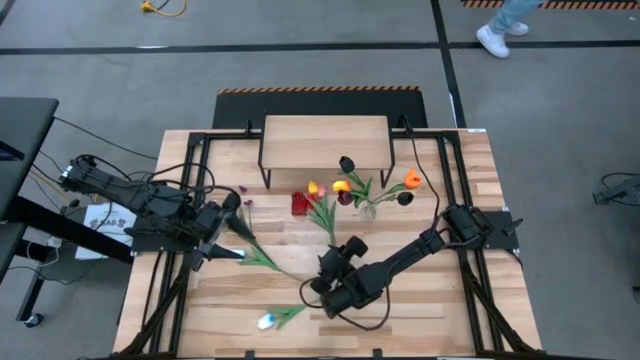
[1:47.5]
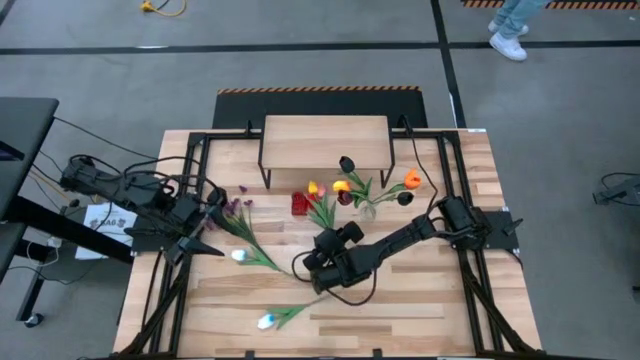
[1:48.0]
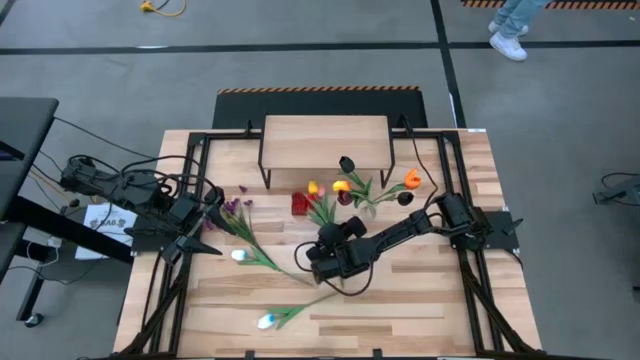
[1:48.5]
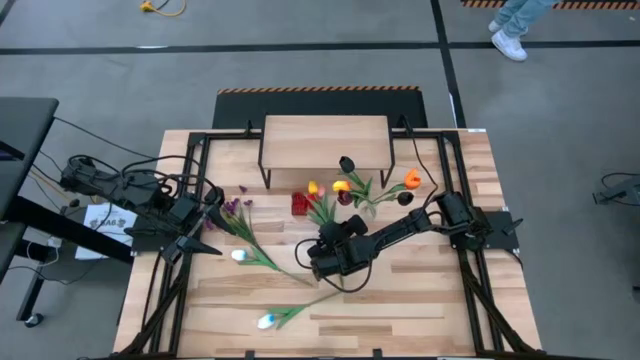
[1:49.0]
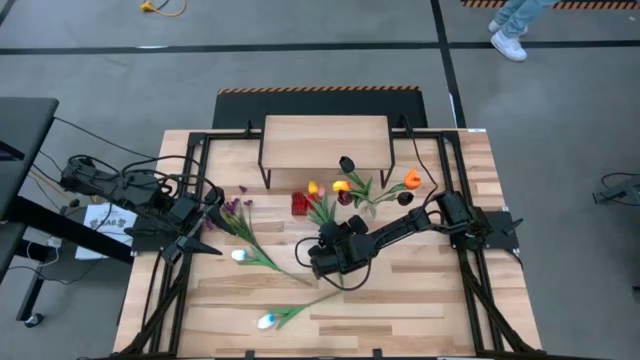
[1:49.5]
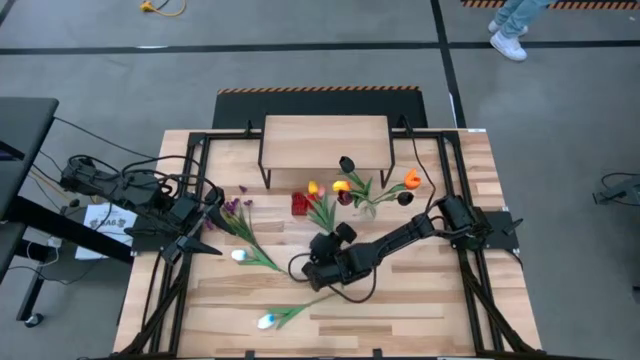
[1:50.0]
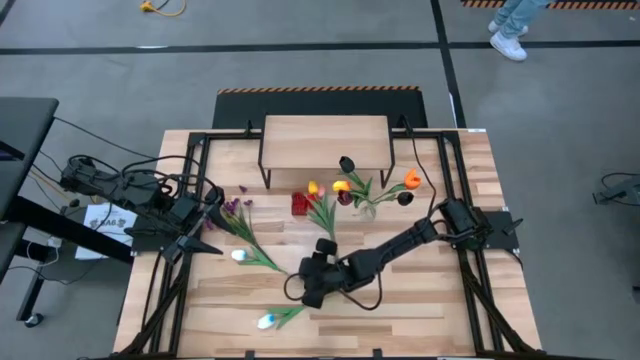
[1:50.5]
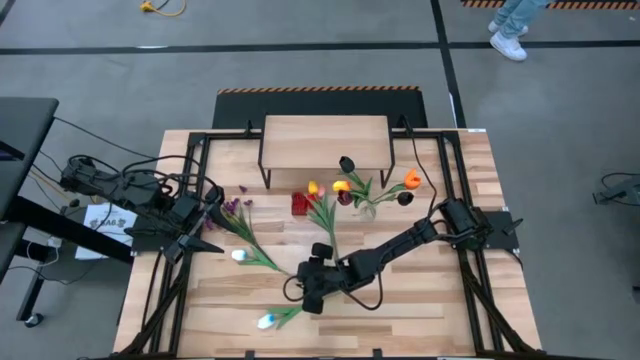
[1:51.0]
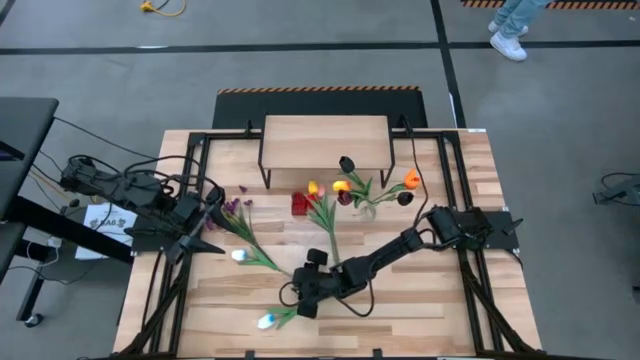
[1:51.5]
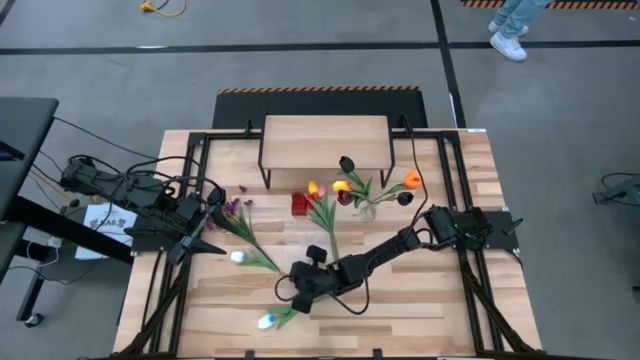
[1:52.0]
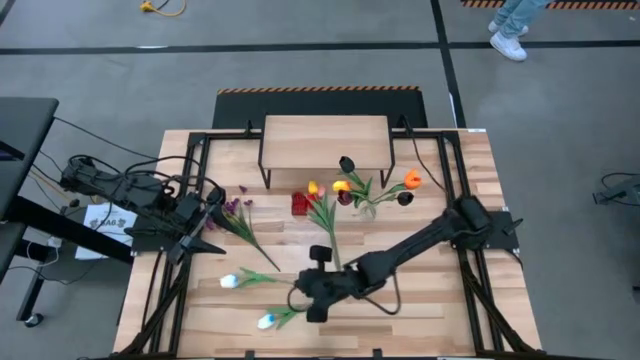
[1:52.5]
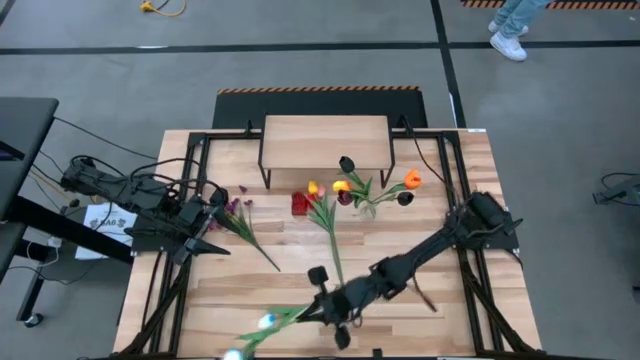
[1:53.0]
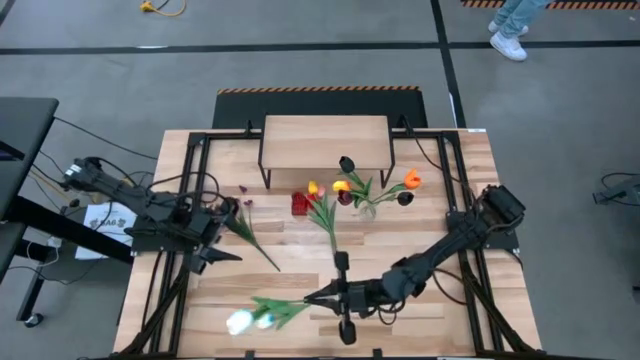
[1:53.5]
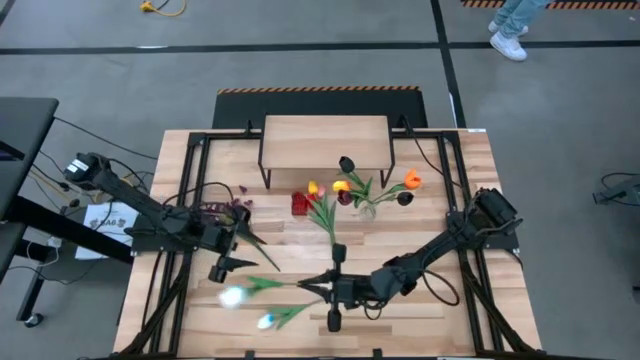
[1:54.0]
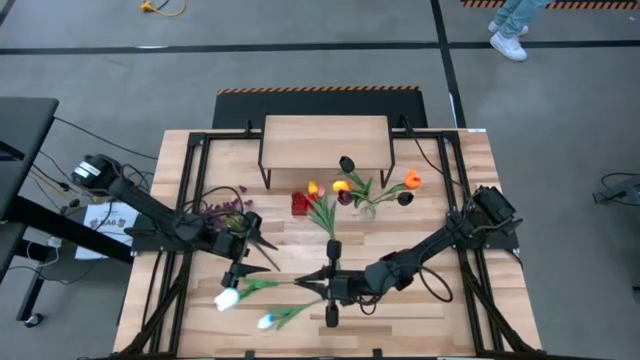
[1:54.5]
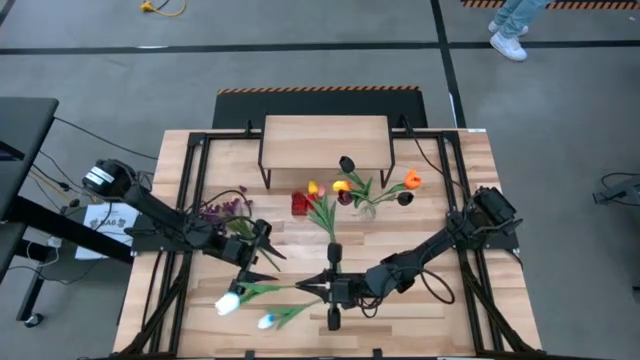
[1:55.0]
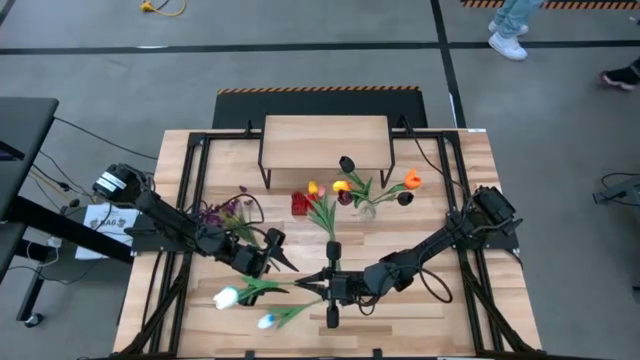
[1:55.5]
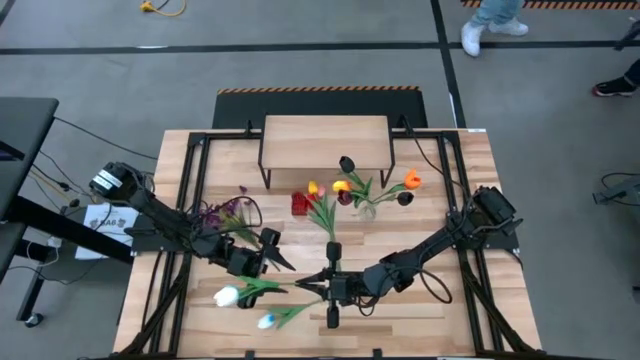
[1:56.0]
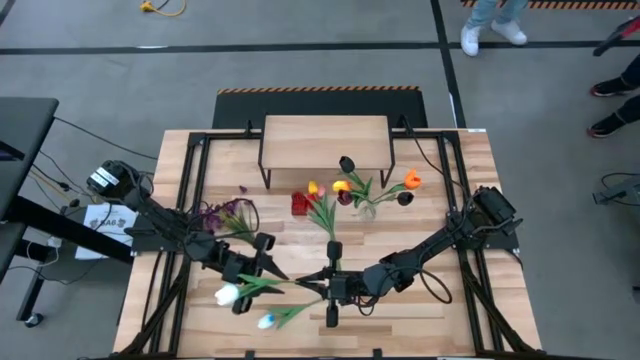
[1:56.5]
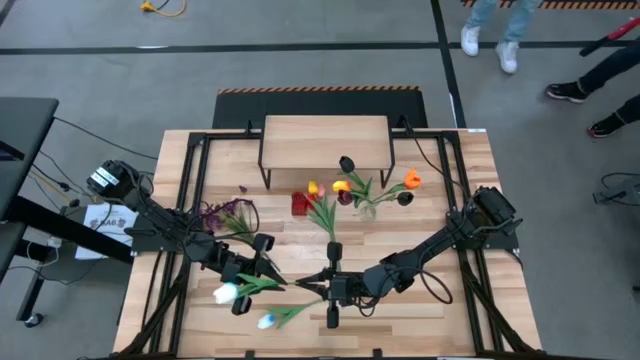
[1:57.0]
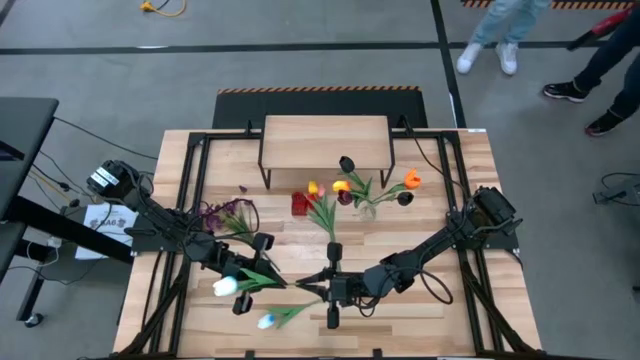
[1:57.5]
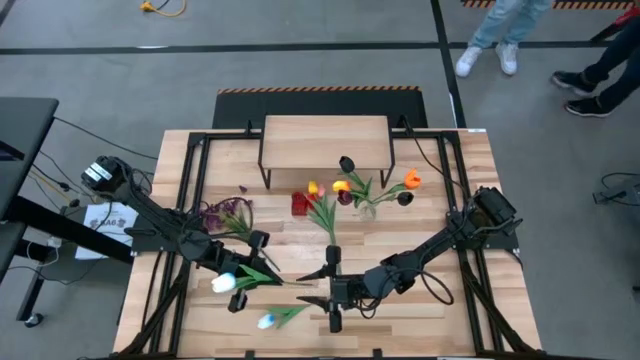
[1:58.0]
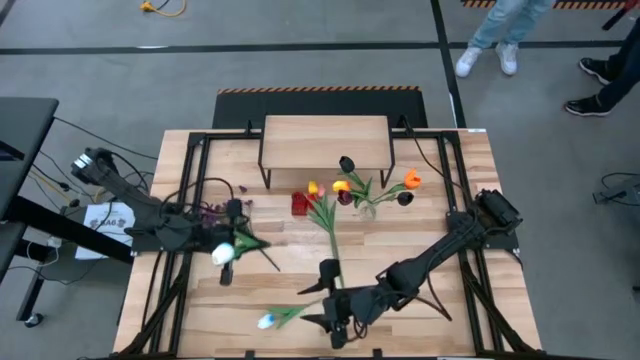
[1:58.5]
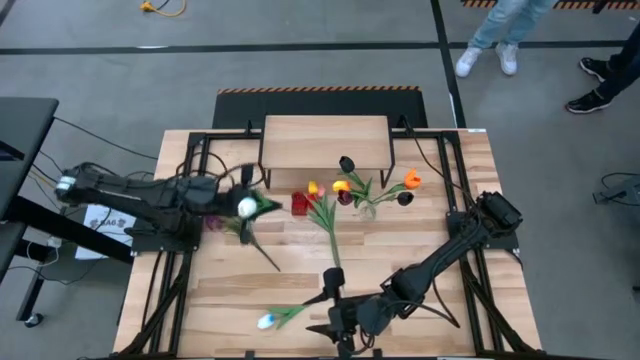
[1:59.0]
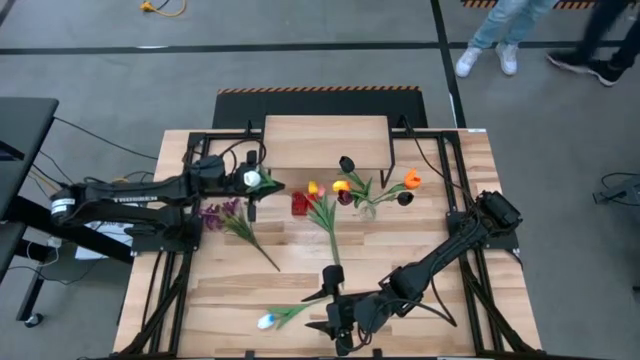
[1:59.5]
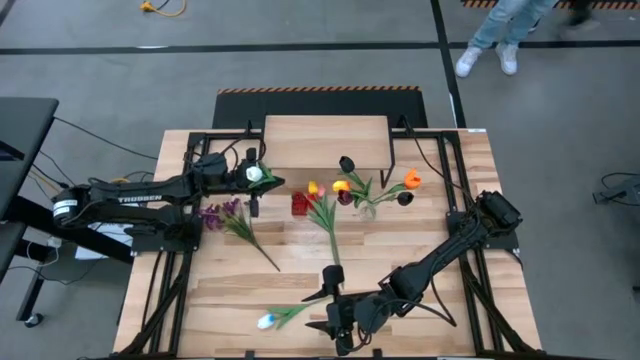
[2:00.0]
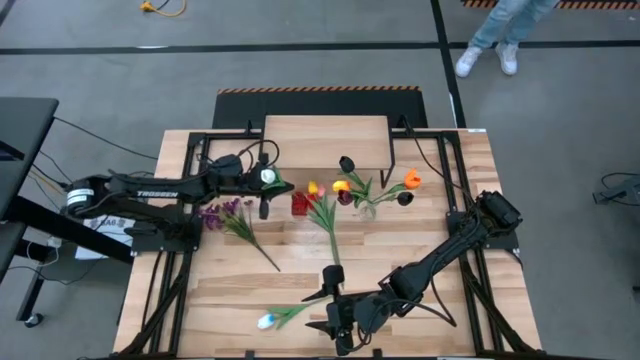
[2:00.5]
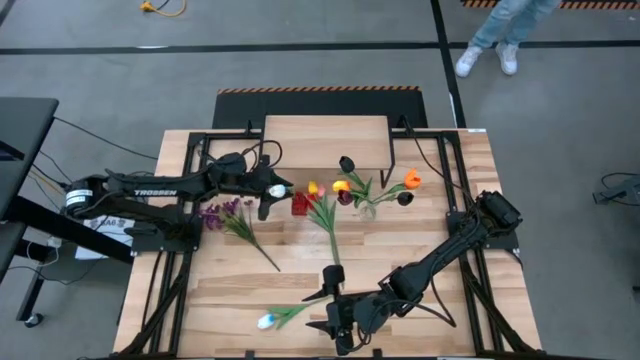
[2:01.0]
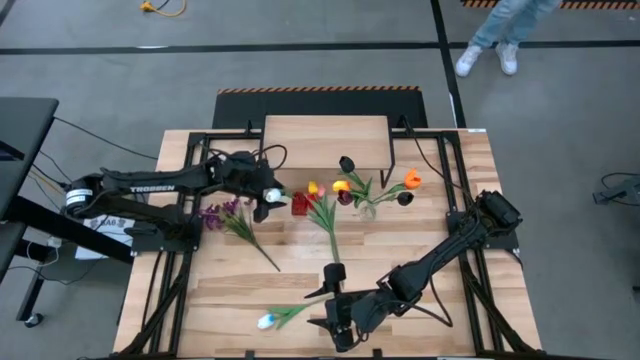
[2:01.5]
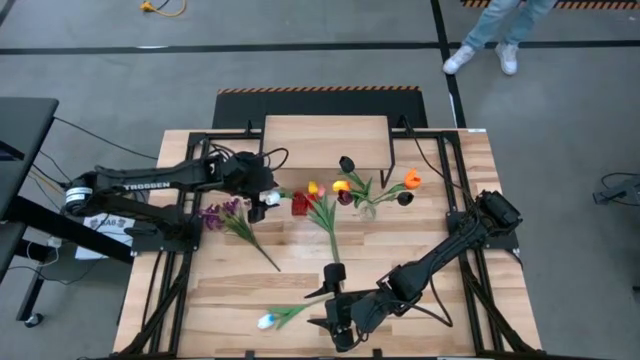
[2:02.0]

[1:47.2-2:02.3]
Task: Pick and place flowers into a vace then onto a shelf
Put the top white flower into the red vase

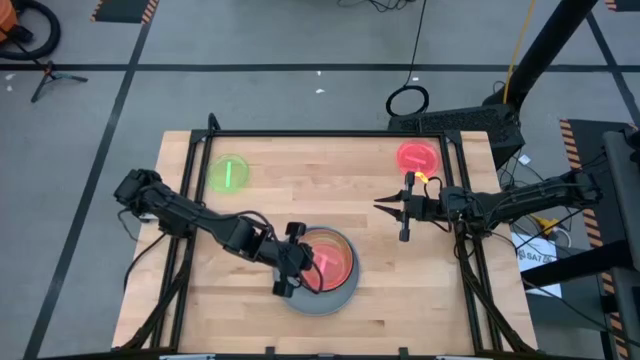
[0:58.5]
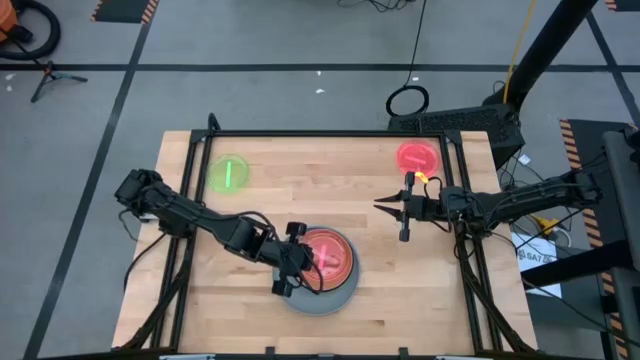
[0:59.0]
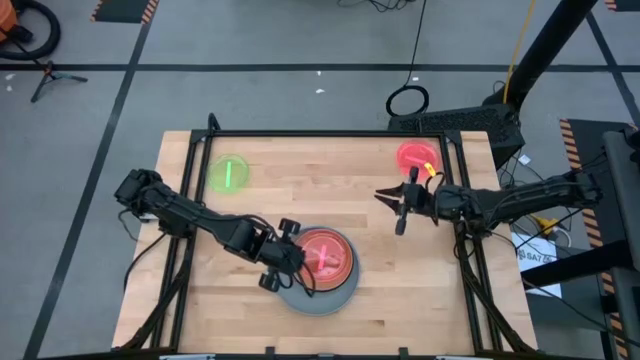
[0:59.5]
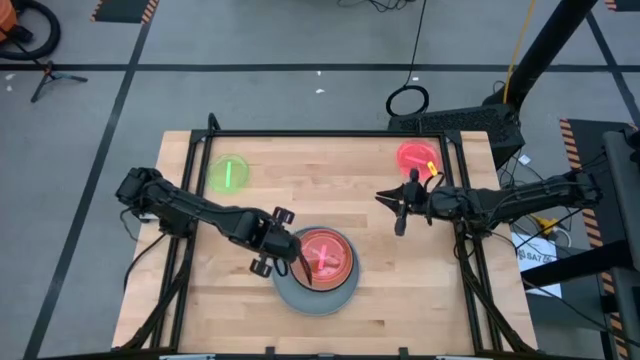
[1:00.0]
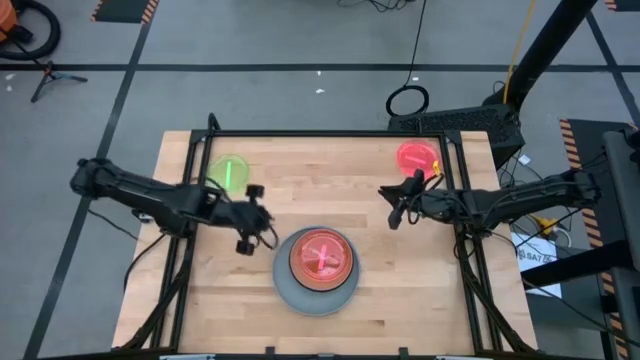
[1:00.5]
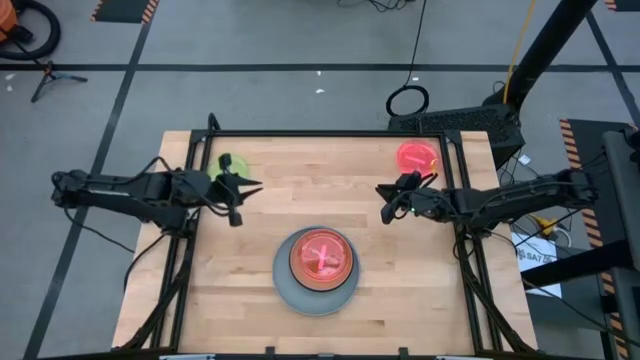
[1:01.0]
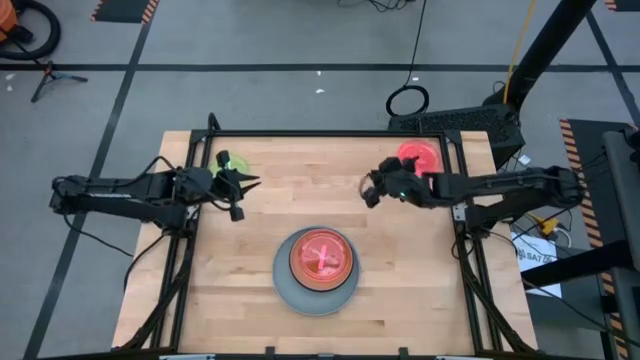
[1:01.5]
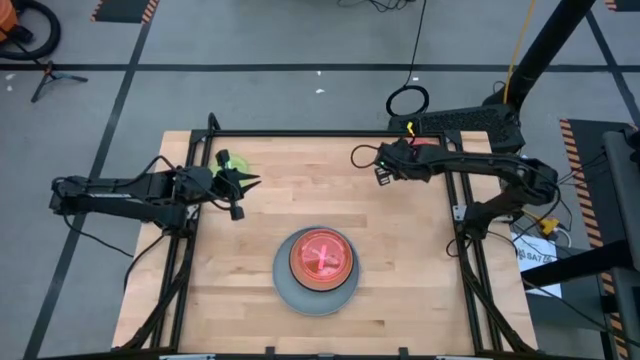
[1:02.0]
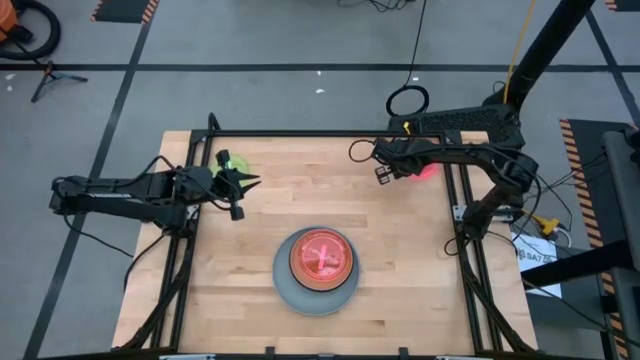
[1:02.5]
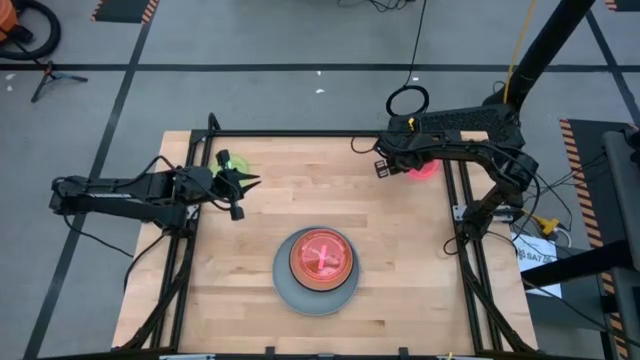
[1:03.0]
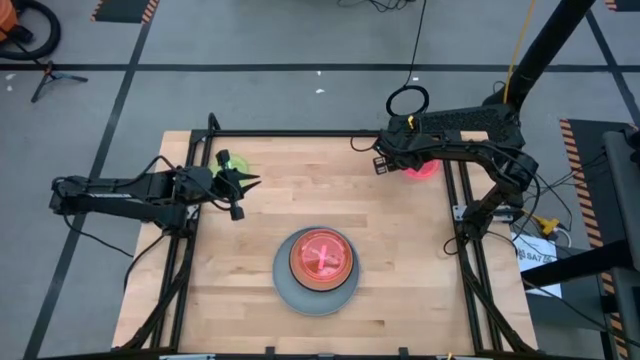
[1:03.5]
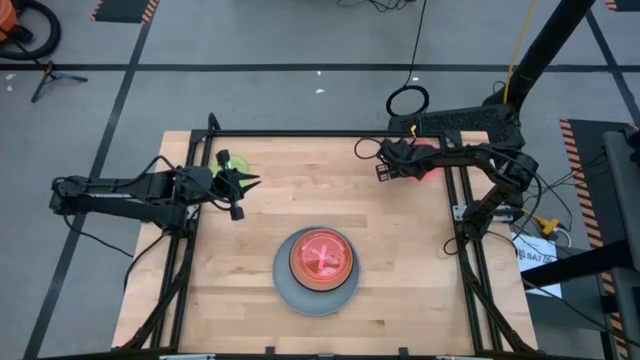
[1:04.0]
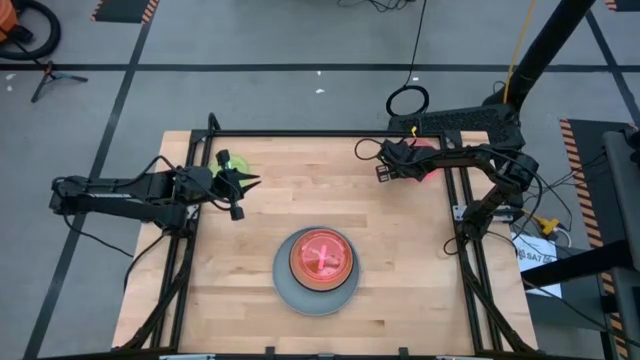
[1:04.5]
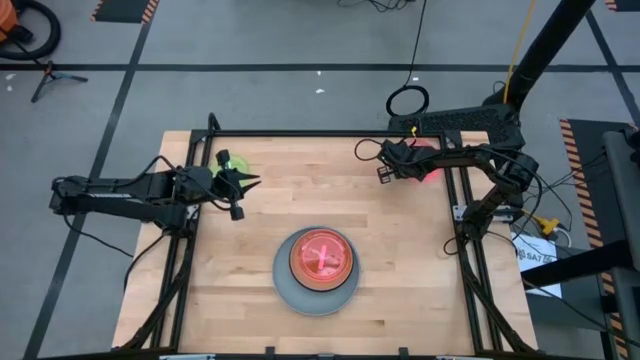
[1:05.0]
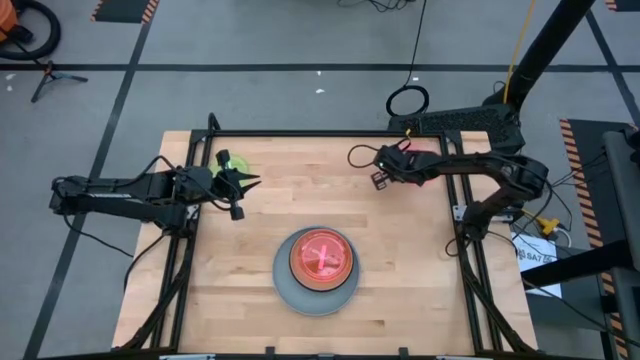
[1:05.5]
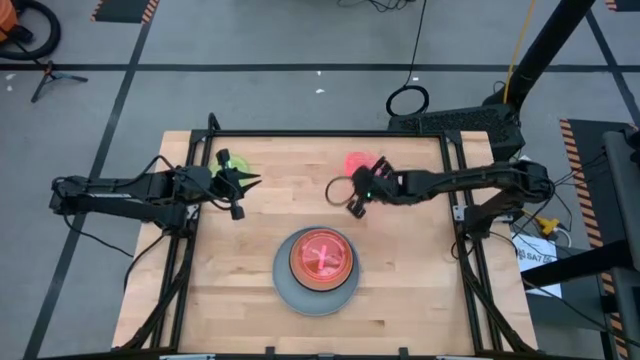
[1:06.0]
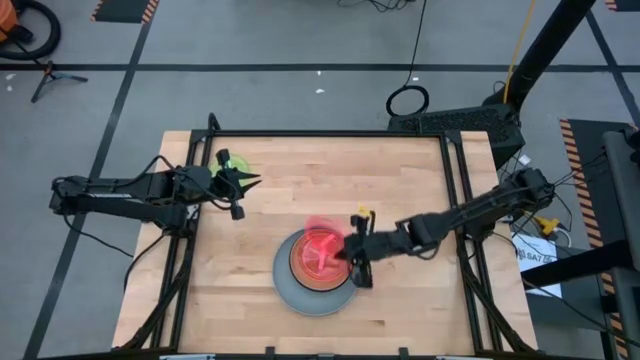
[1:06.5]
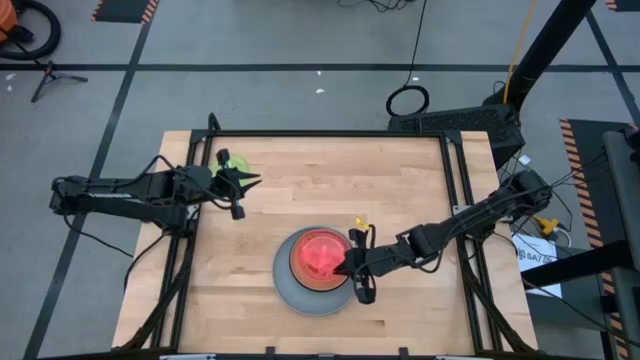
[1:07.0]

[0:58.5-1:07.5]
Task: Stack plastic plates
Stack the red transparent plate on top of the red transparent plate
